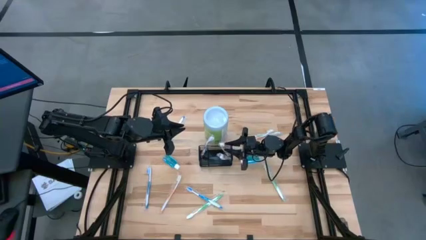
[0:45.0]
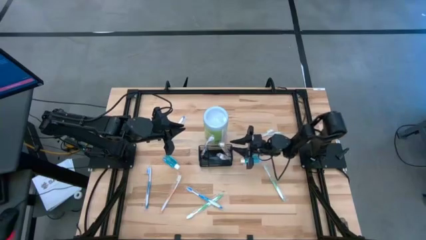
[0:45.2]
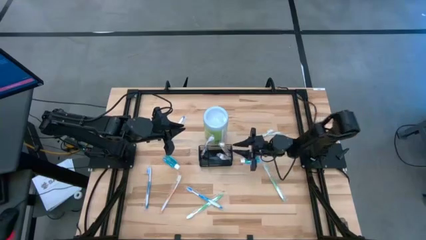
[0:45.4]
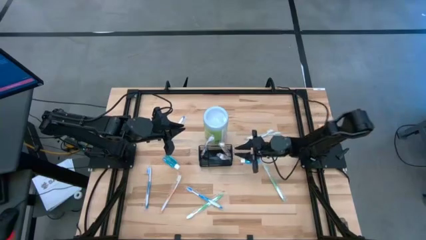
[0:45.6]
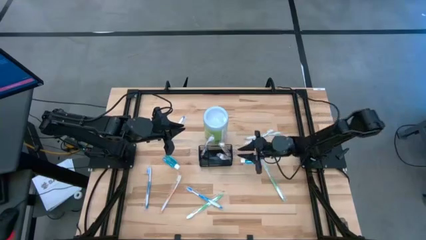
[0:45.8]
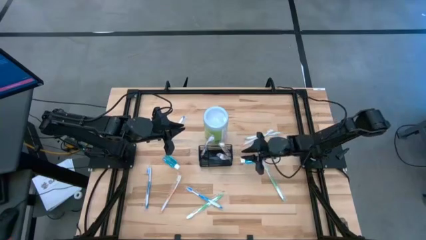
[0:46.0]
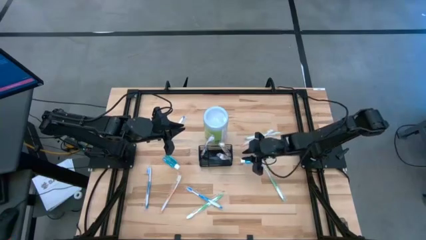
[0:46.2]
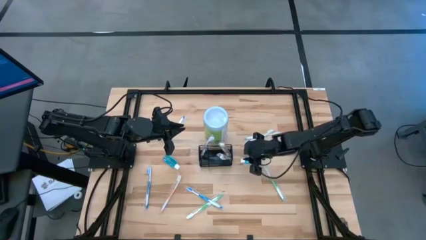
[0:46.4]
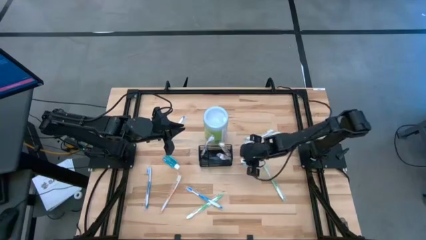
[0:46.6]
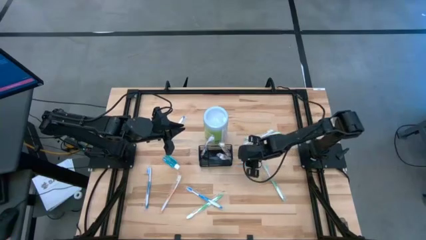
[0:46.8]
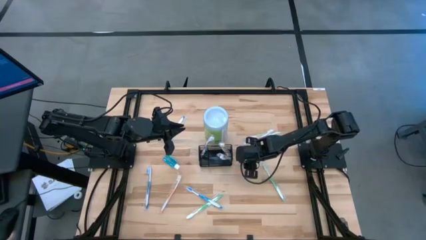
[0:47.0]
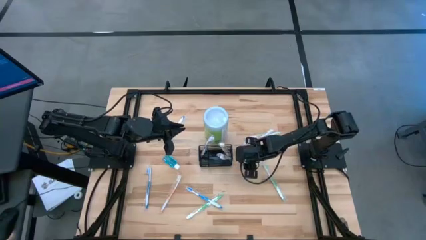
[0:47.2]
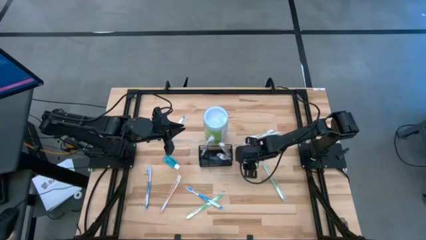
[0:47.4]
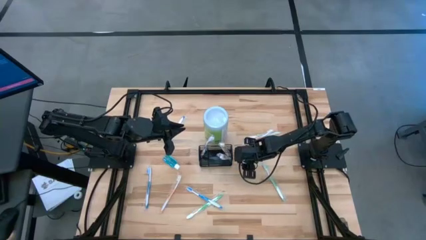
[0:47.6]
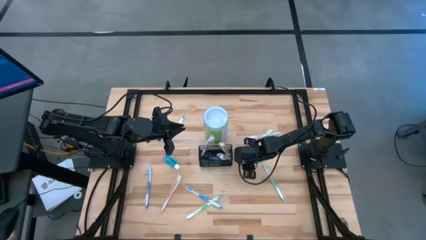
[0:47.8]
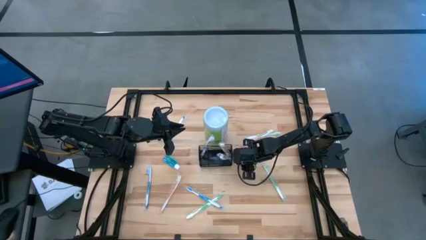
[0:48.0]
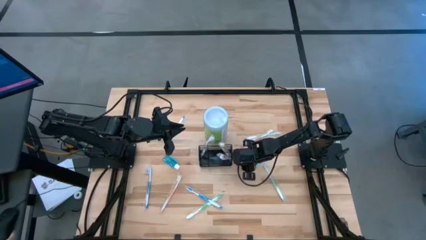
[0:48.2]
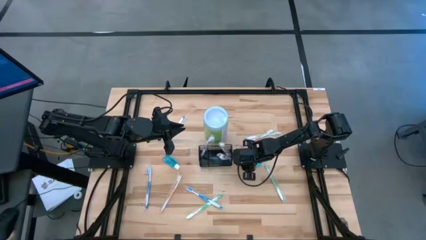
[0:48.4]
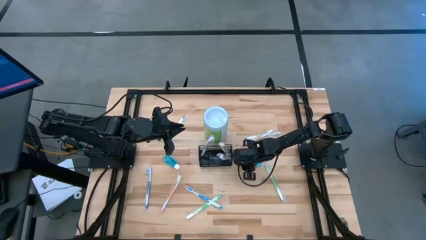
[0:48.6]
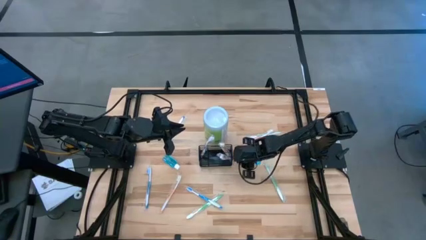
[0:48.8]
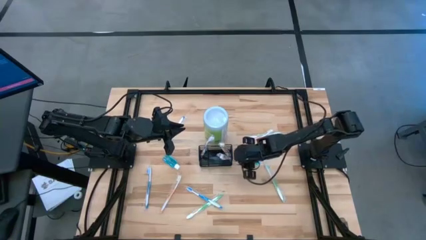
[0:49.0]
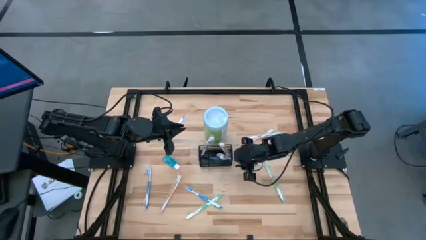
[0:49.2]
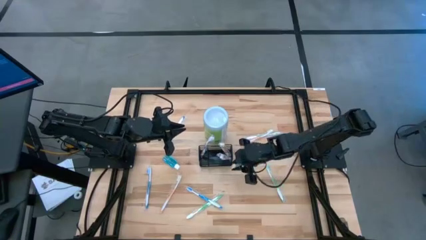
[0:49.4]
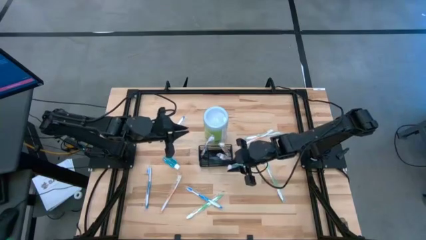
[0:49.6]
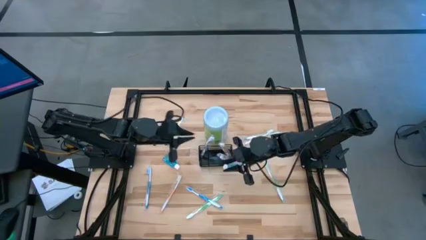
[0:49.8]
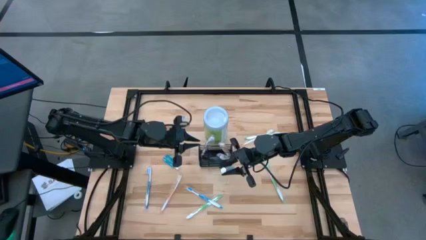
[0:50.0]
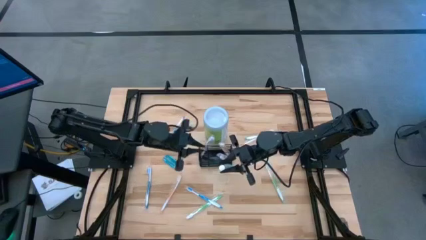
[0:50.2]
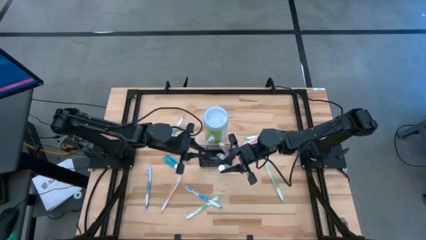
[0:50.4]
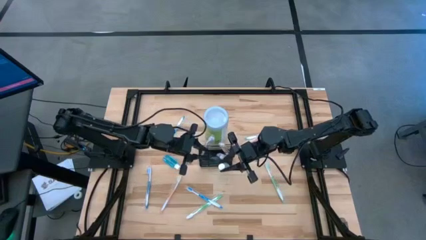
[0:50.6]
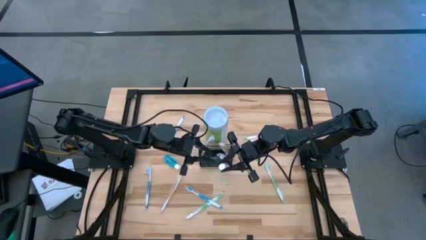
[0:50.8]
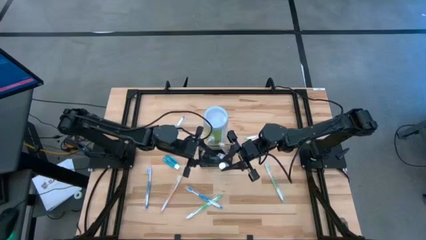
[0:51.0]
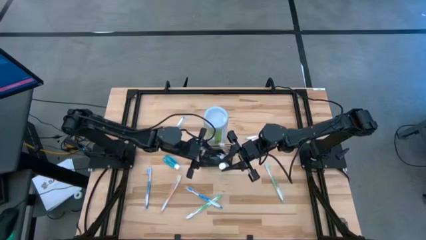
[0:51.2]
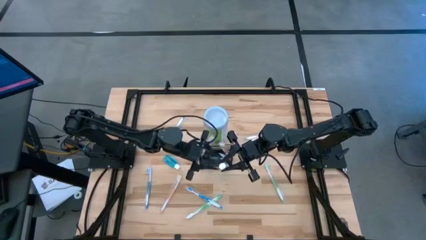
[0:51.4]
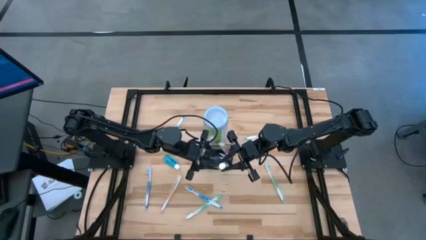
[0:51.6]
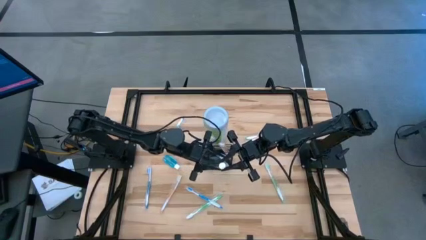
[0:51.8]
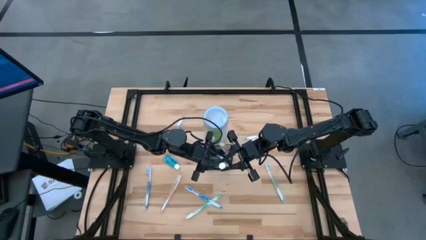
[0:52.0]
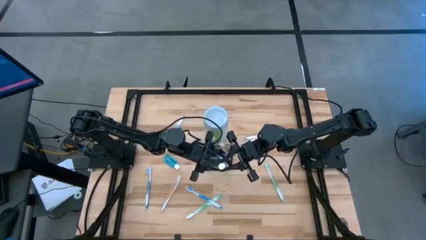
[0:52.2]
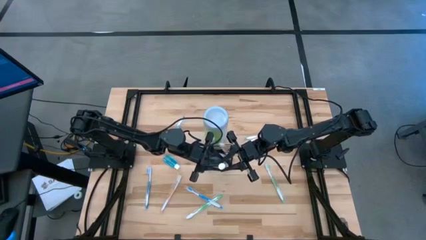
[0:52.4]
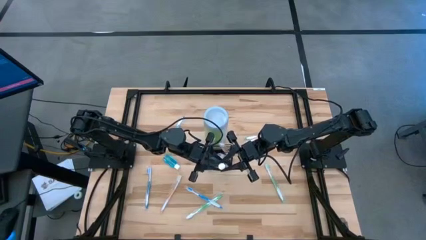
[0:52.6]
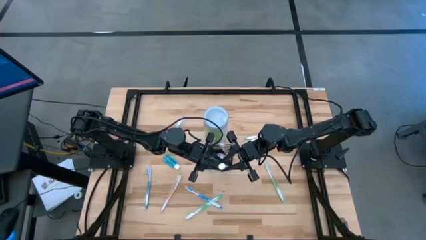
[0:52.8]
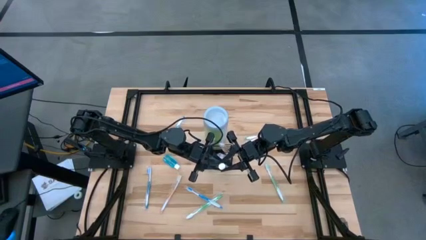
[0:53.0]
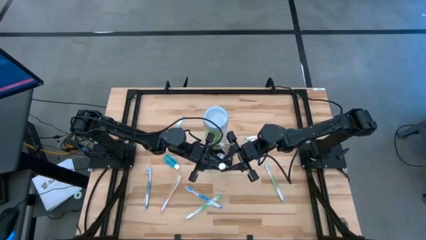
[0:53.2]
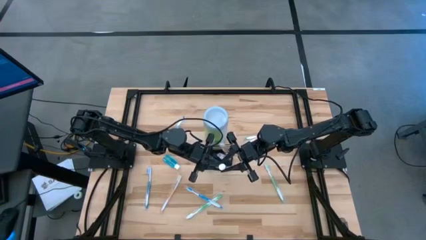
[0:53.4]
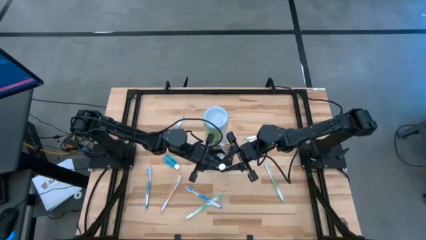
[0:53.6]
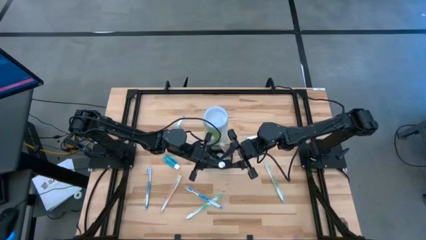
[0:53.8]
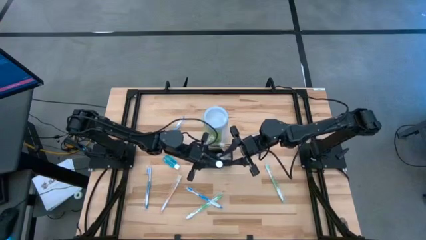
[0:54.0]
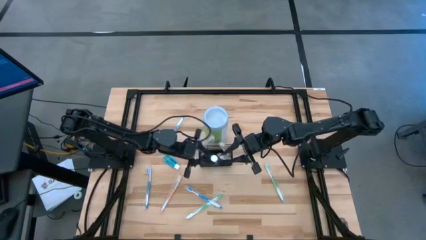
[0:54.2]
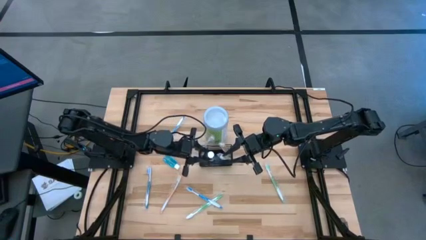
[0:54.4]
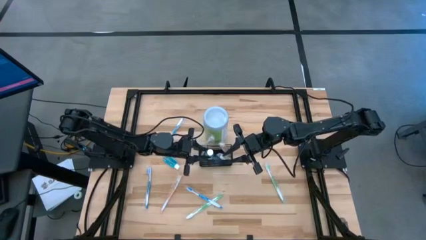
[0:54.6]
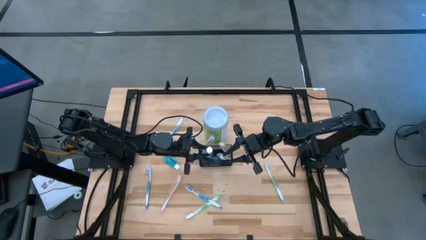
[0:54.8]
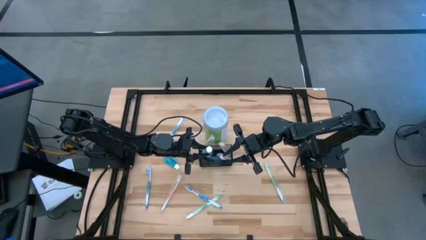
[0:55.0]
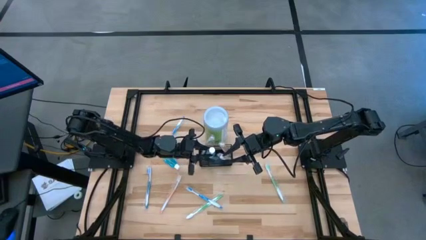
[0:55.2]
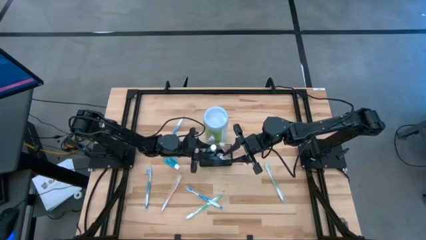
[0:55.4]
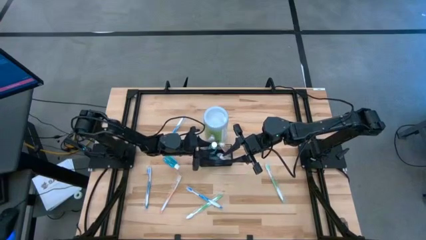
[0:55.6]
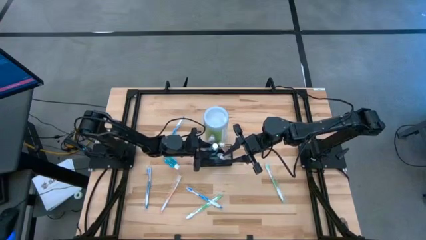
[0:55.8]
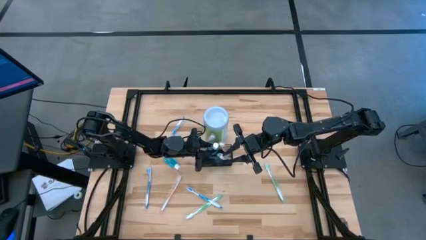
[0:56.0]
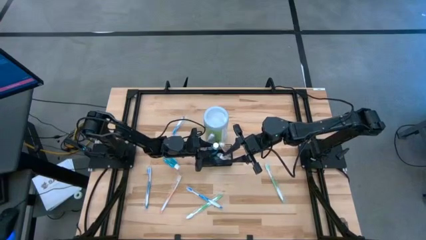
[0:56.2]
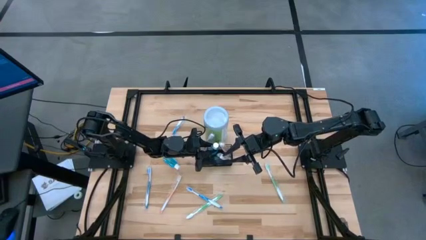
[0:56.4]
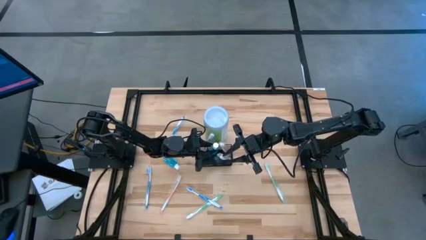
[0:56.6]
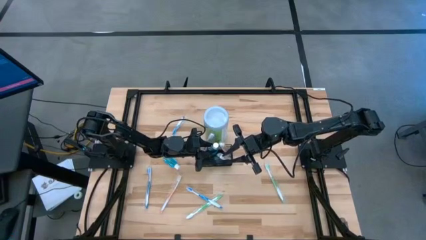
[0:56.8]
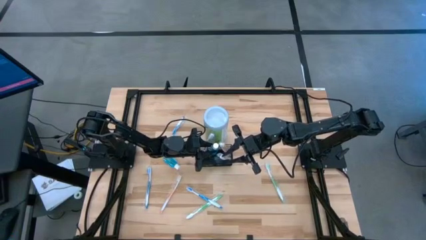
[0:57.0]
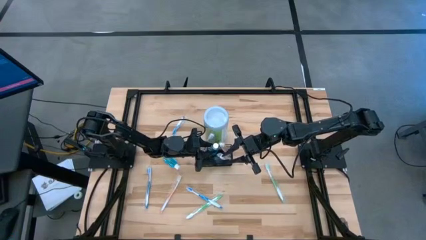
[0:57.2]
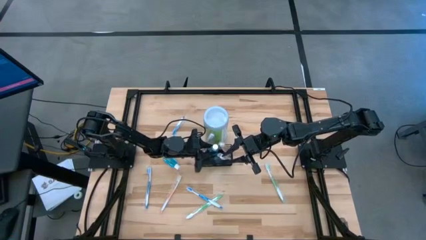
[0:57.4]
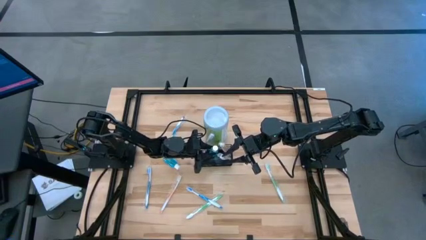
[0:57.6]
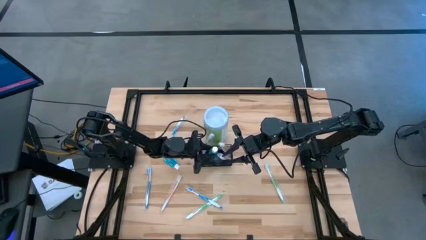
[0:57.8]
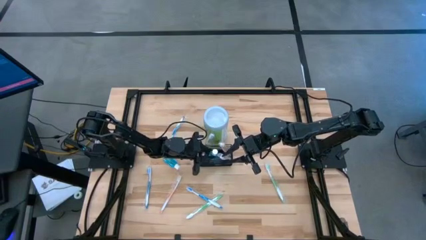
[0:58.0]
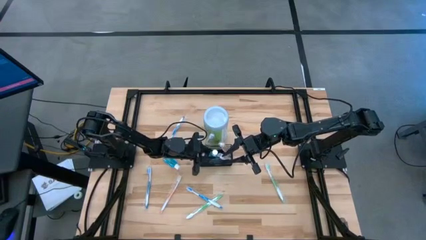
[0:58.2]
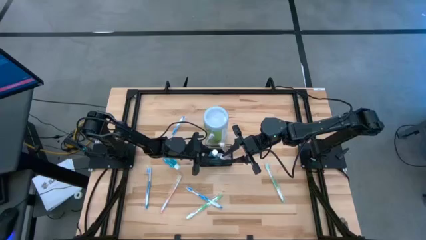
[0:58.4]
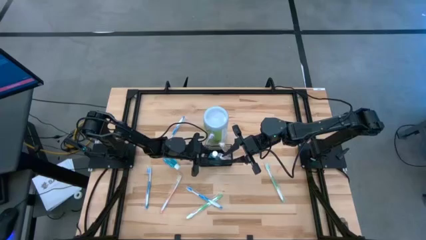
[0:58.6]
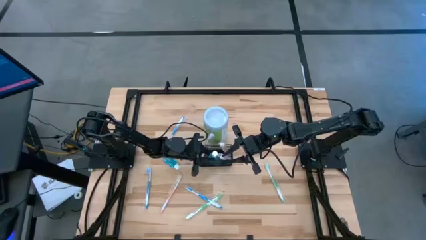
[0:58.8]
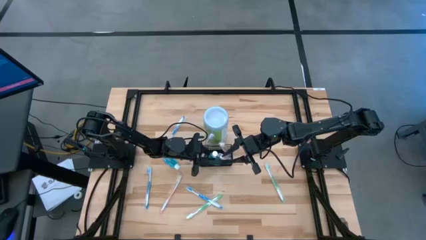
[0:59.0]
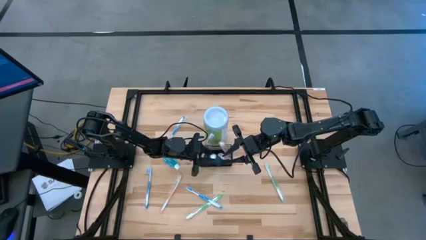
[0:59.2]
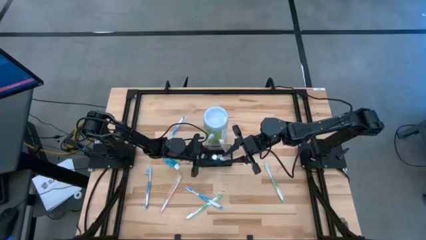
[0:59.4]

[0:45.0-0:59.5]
Task: Pick & Place toothbrushing station
Put the right mouthwash into the the wire organizer

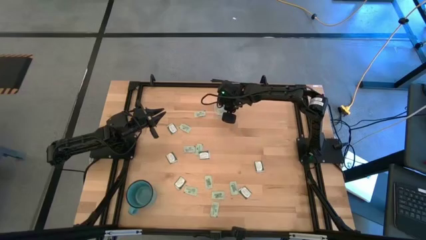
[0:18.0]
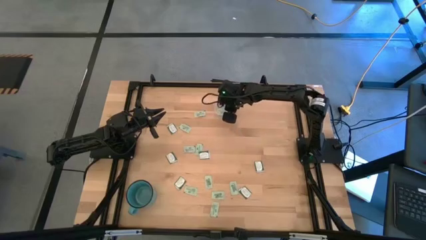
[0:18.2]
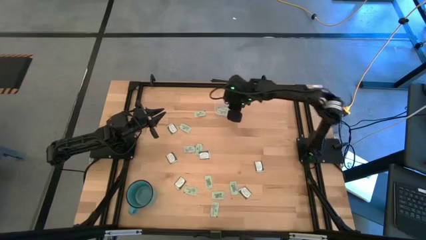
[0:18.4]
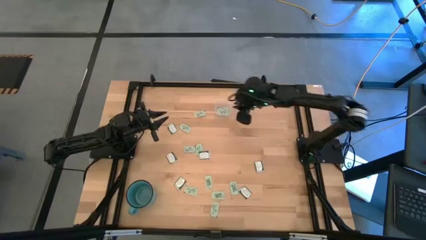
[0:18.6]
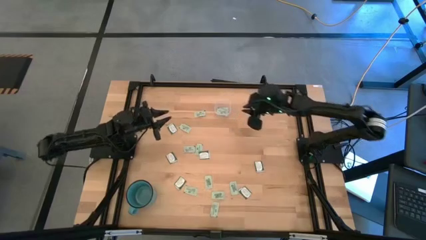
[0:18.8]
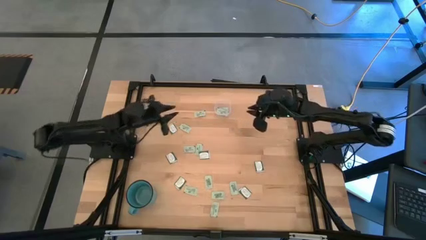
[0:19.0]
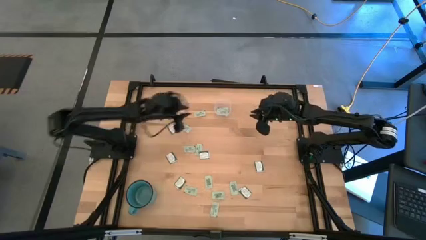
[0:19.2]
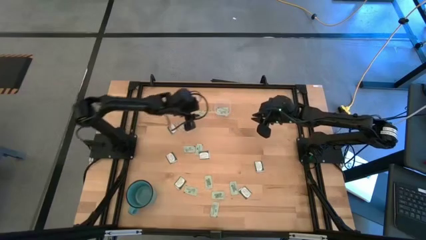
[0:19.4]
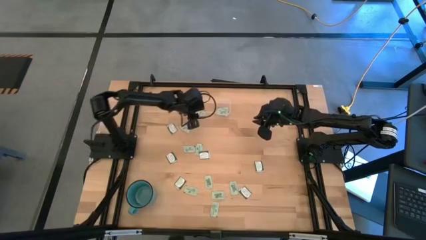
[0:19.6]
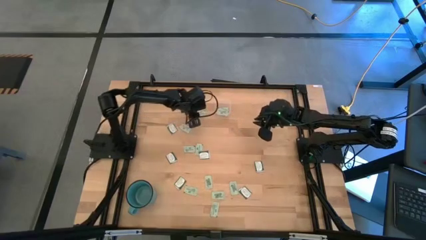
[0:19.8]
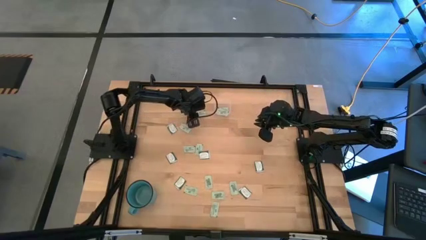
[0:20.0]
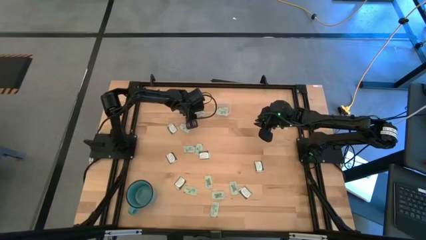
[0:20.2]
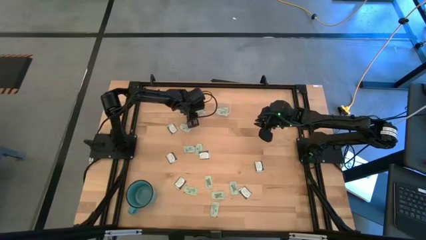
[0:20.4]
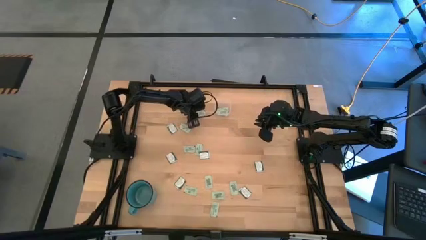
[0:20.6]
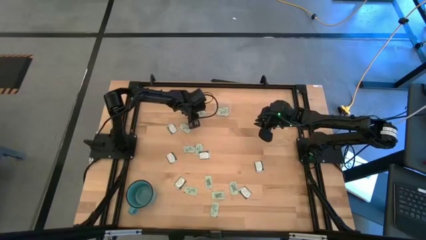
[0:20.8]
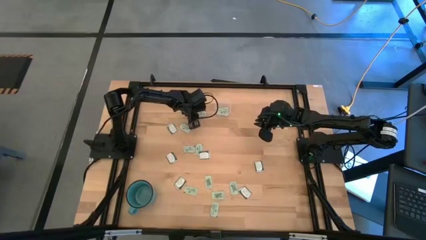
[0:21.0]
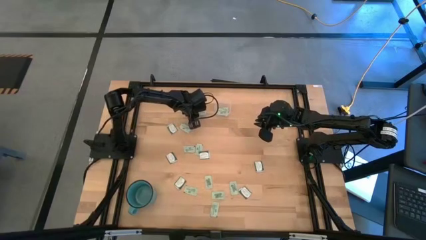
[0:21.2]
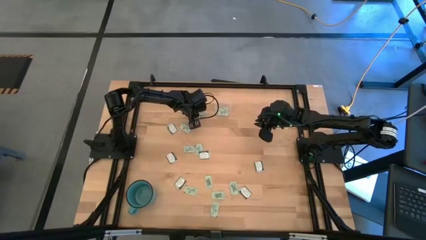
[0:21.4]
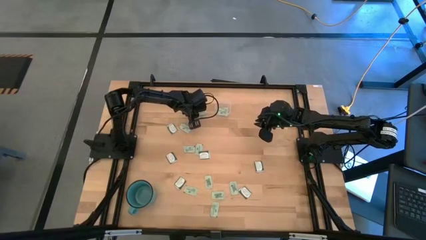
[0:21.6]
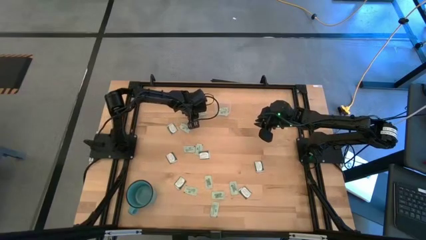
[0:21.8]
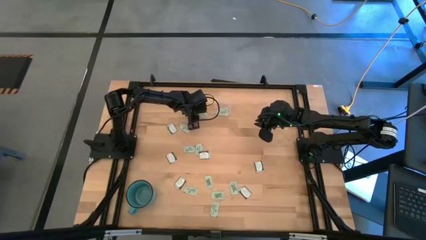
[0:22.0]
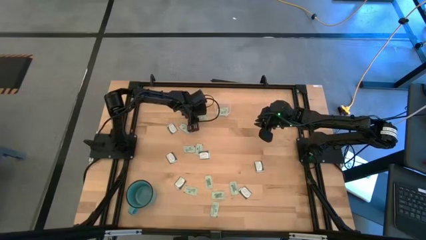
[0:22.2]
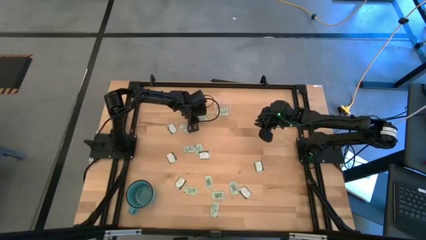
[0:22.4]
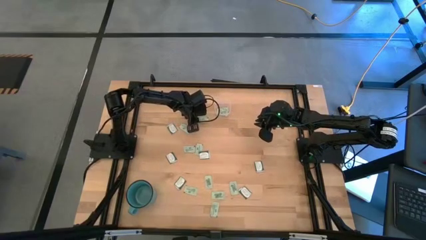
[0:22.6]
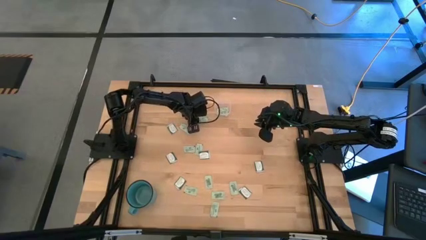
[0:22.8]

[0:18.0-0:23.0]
Task: Pick and place items into bin
Put the light green stevia packet into the transparent bin
